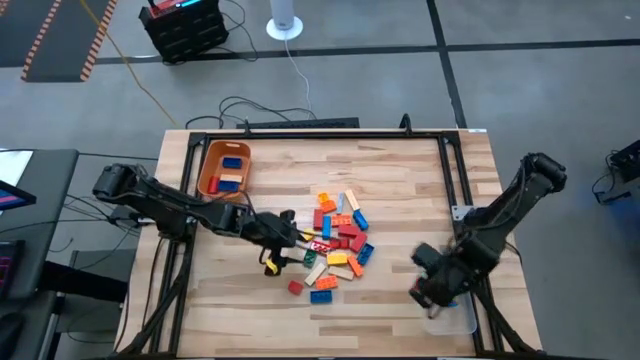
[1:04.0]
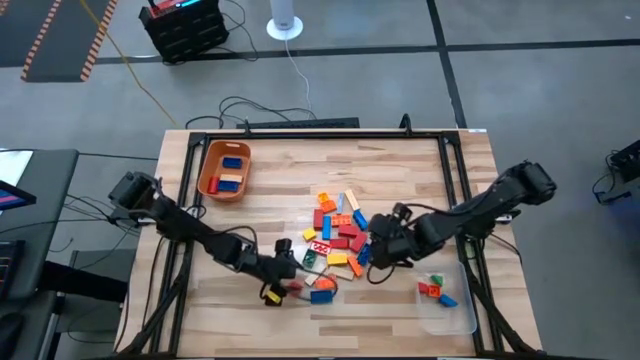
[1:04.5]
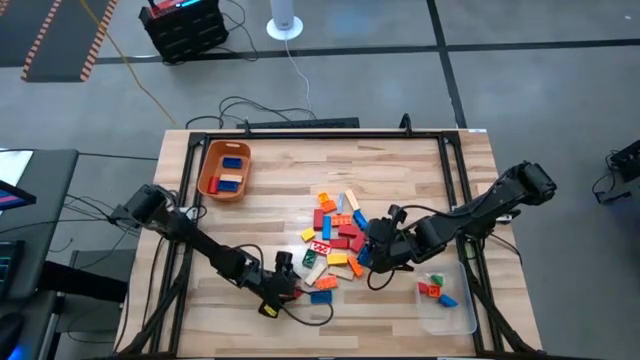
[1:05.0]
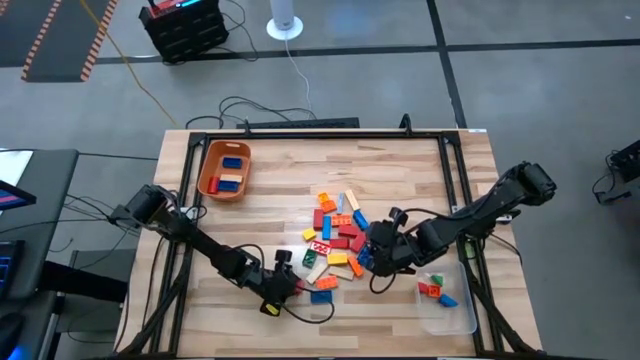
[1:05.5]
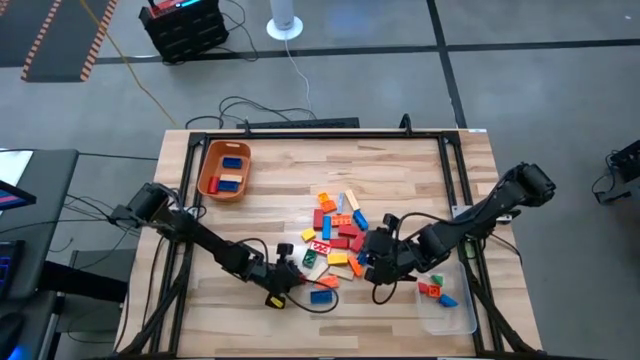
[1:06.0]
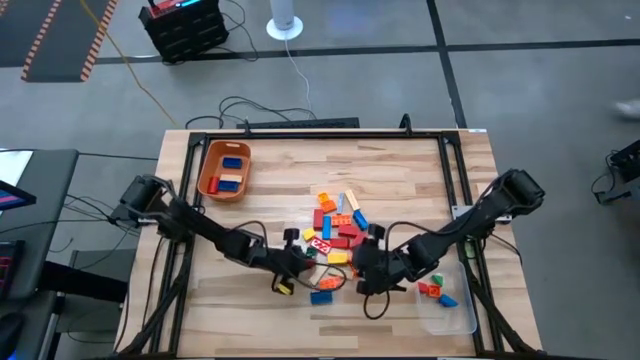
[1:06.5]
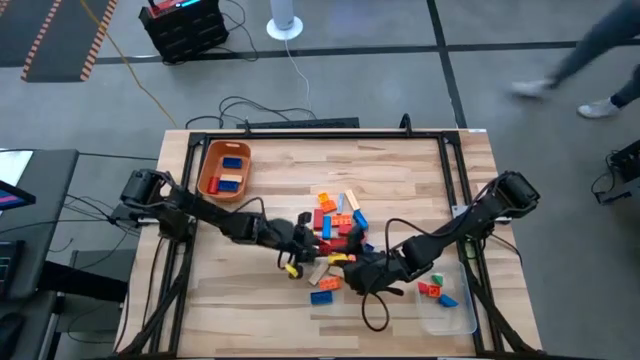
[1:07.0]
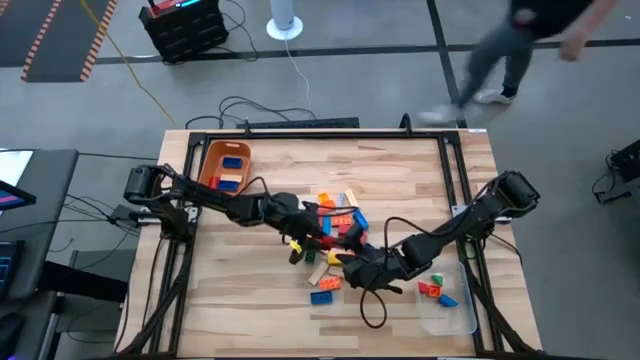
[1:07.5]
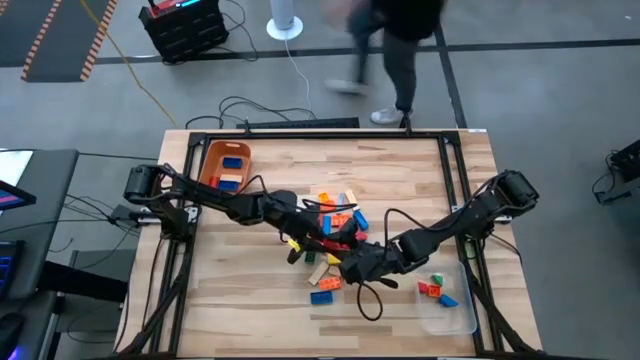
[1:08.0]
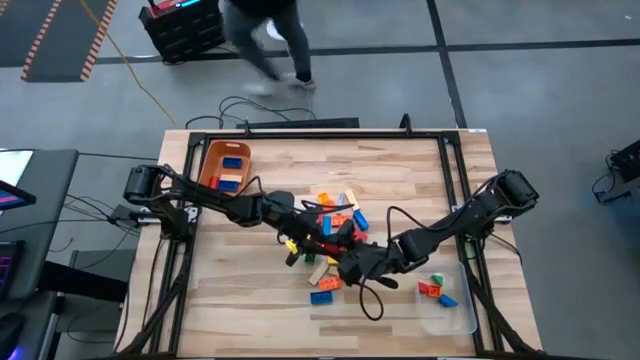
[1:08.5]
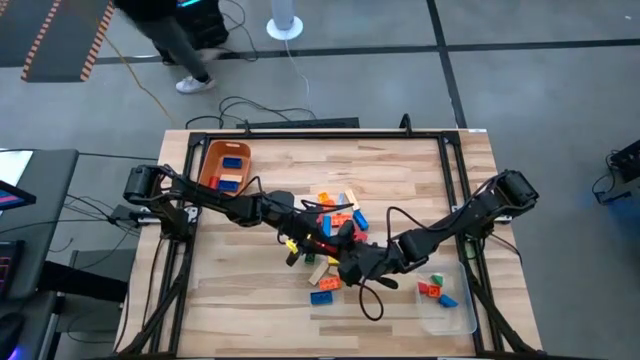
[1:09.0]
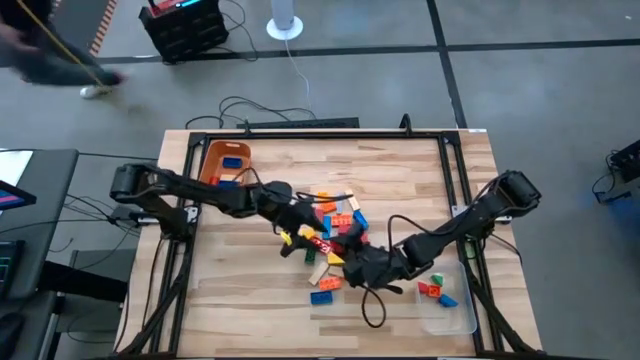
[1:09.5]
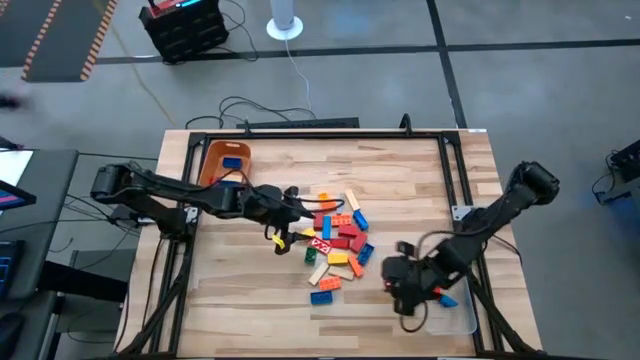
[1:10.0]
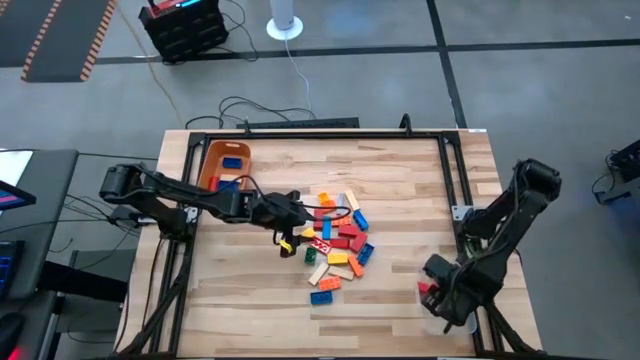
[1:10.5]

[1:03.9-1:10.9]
Task: Sort blocks by size
Put the small red wooden block into the transparent bin

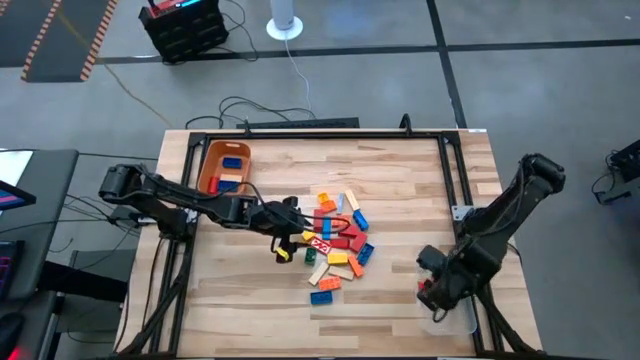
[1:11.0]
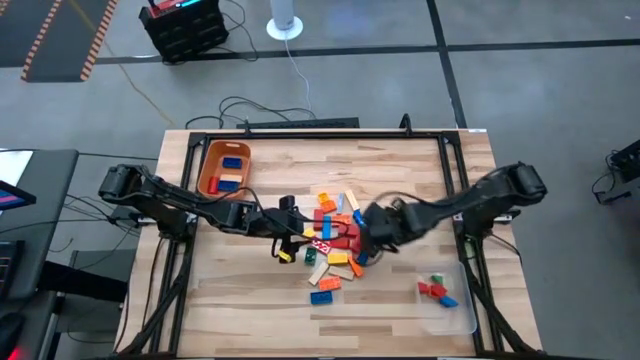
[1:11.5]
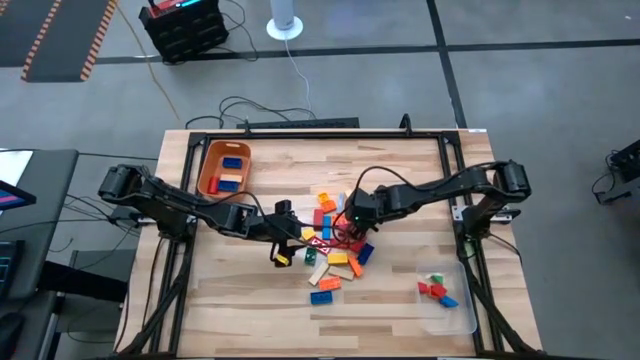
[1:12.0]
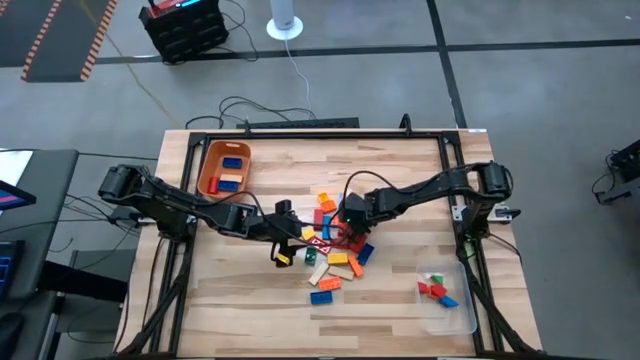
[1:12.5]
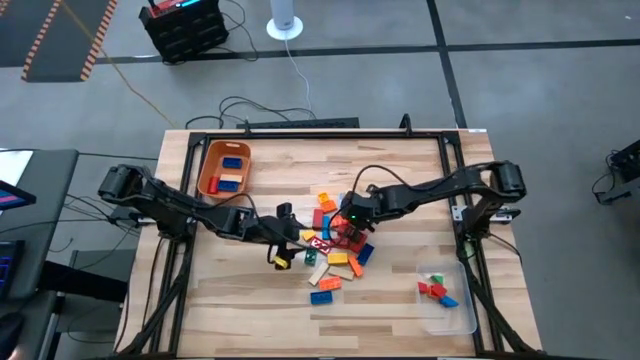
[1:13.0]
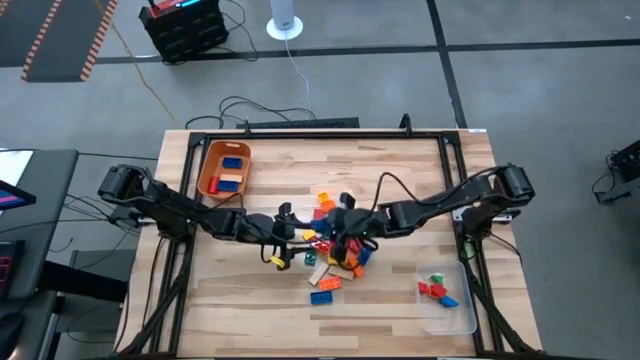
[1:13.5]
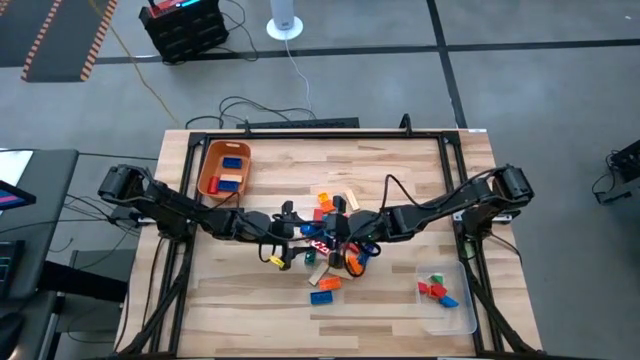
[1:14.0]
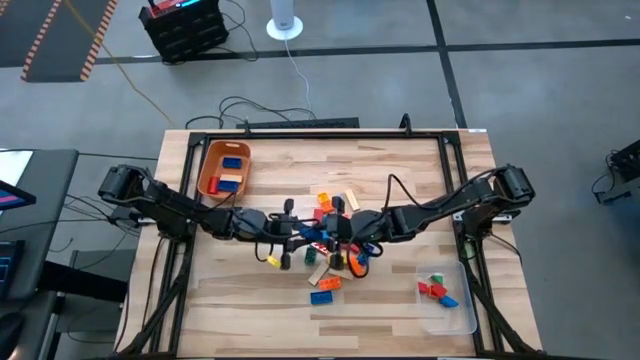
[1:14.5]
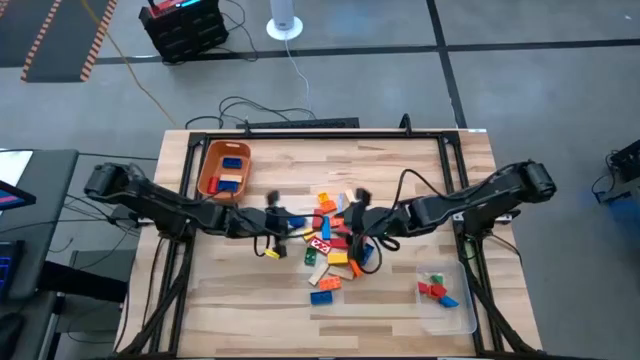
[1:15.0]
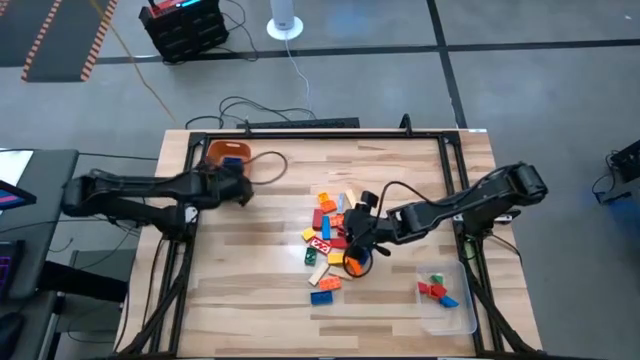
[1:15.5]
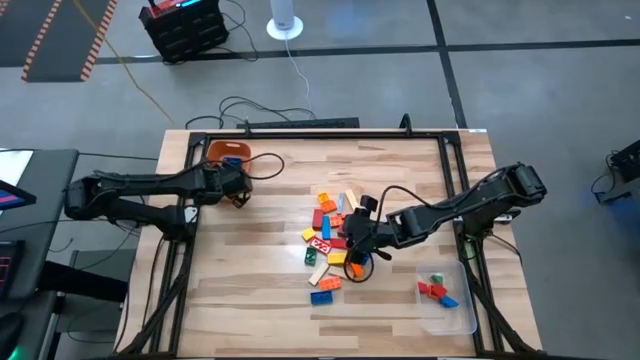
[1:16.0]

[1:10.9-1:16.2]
Put the large blue game piece into the orange bin

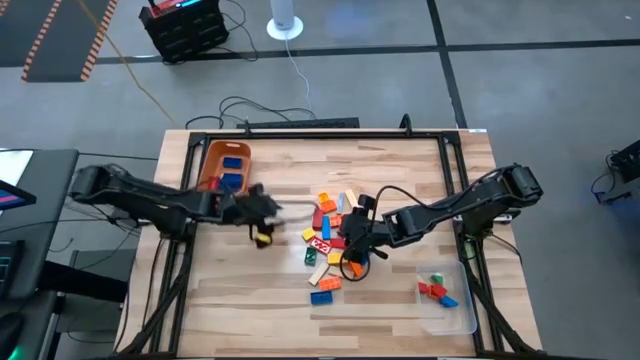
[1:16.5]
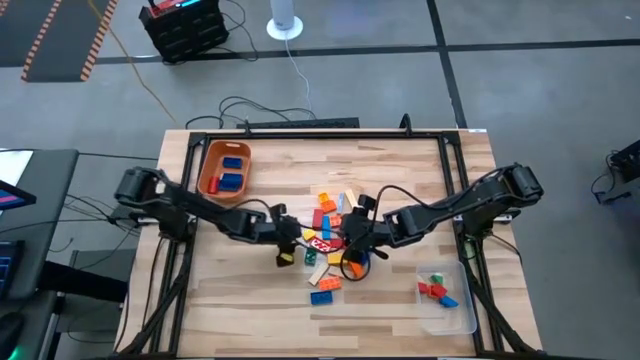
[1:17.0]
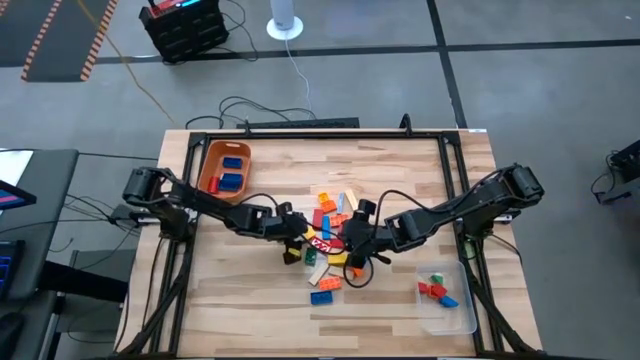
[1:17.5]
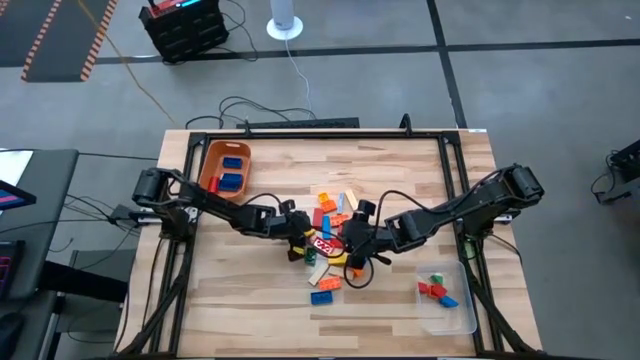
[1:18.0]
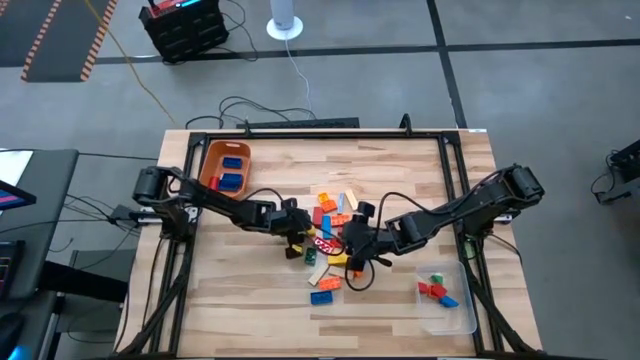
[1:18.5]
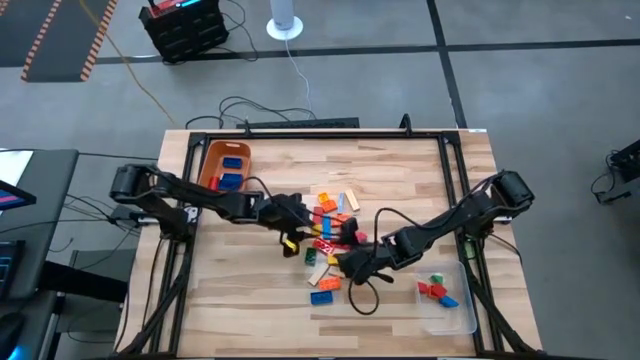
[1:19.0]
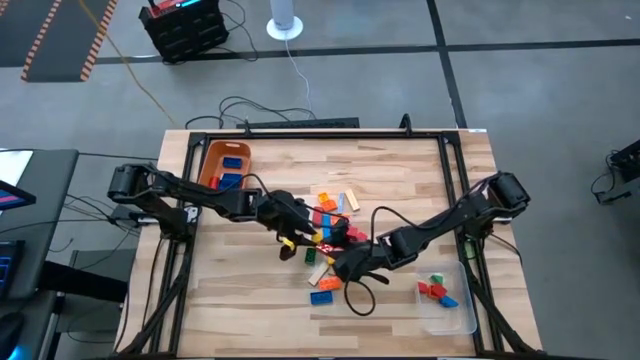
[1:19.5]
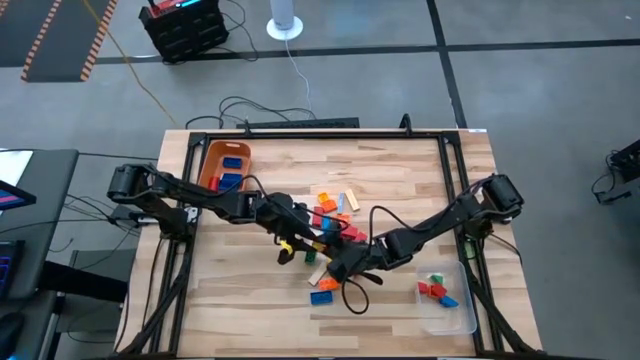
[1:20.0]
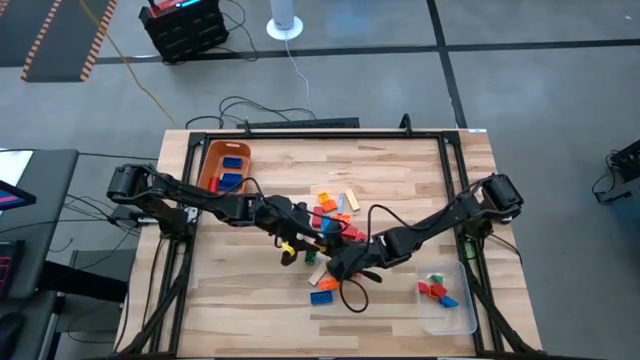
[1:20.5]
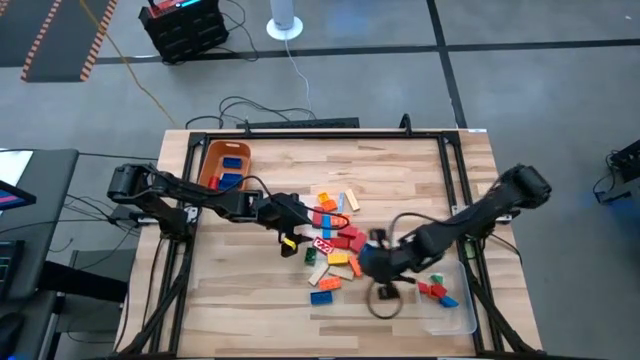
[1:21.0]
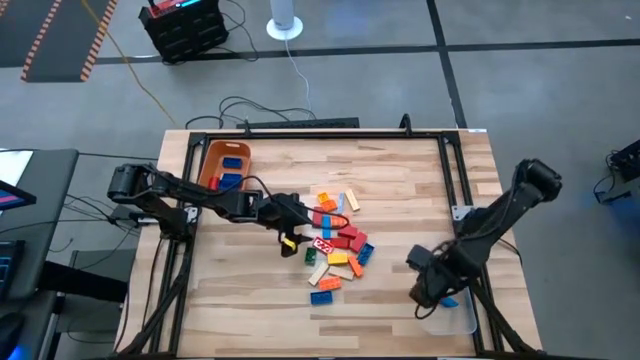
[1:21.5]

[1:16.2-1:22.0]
Put the small yellow wooden block into the transparent bin

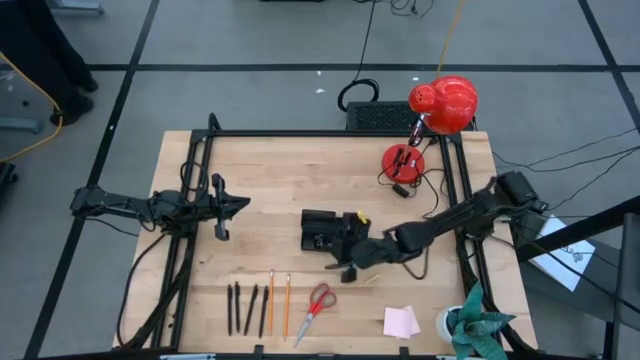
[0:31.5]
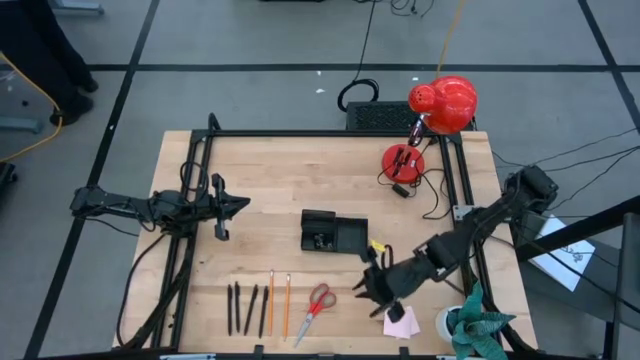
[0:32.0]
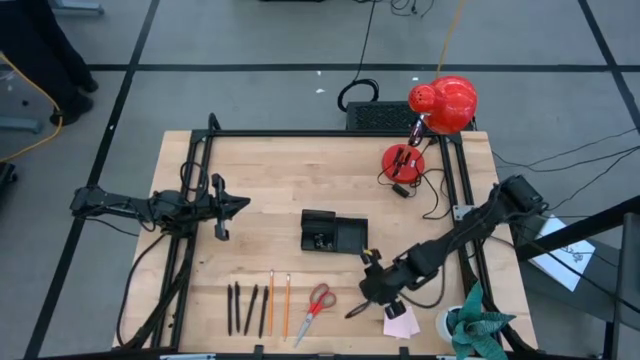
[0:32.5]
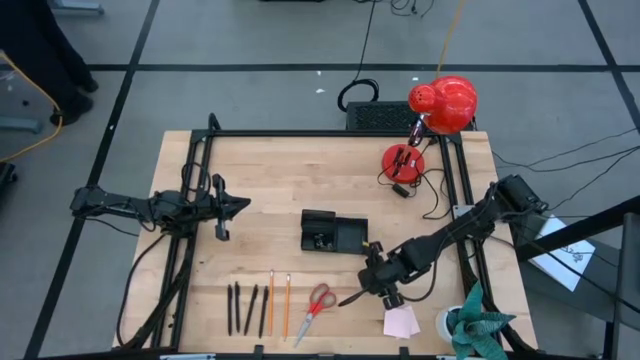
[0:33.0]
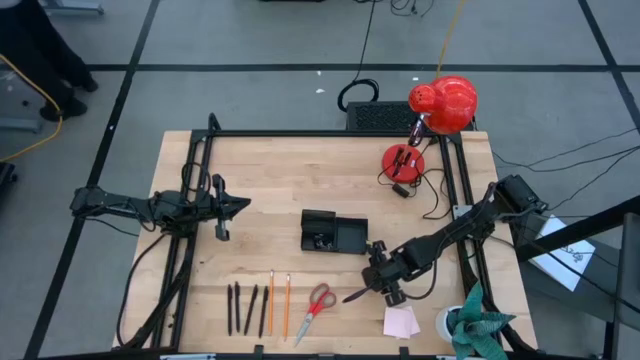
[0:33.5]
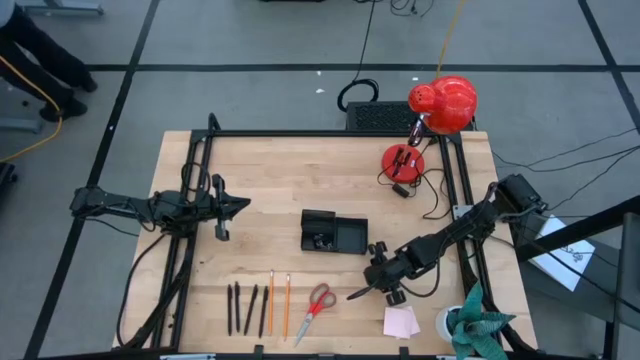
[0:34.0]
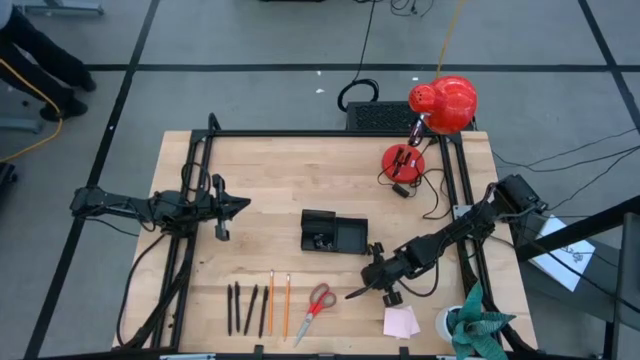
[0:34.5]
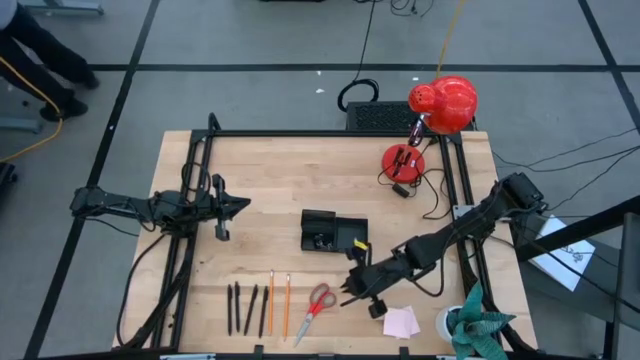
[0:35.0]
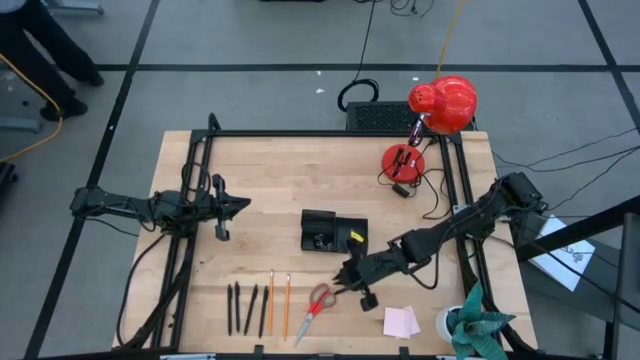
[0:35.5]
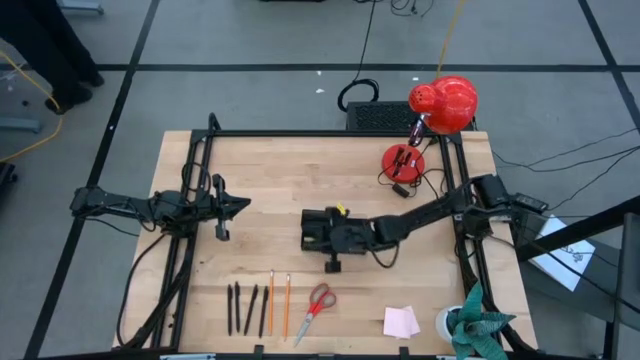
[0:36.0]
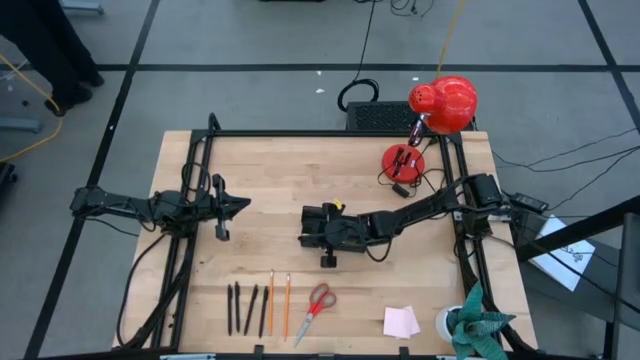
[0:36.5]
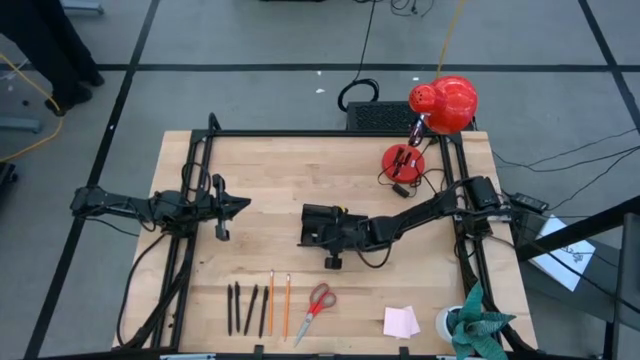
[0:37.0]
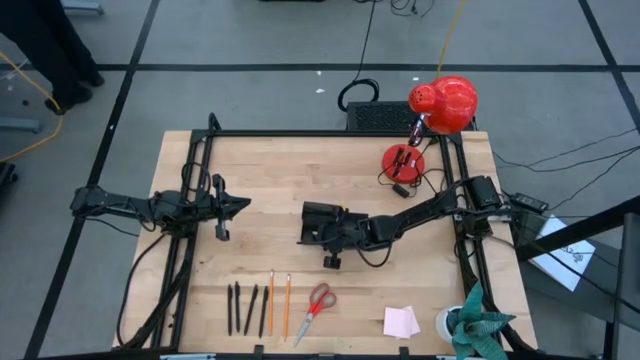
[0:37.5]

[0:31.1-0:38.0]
Task: Pick and place office supplies into organizer
Put the eraser into the desk organizer
